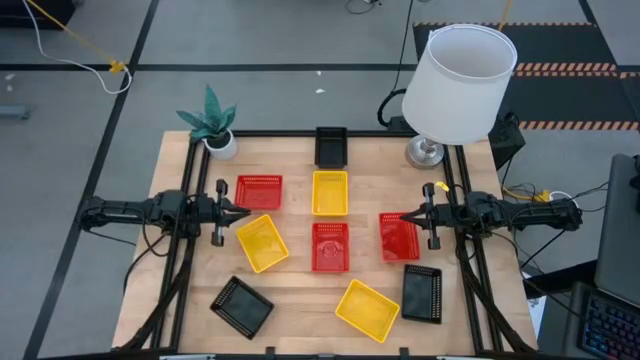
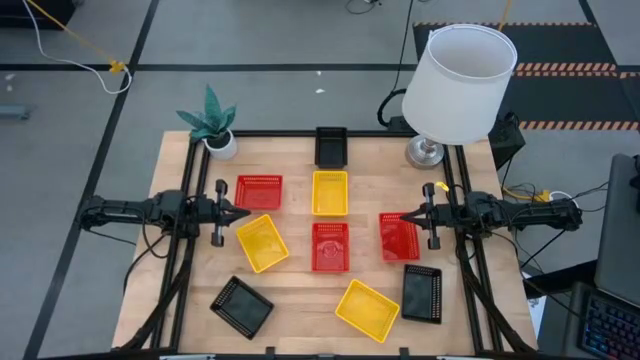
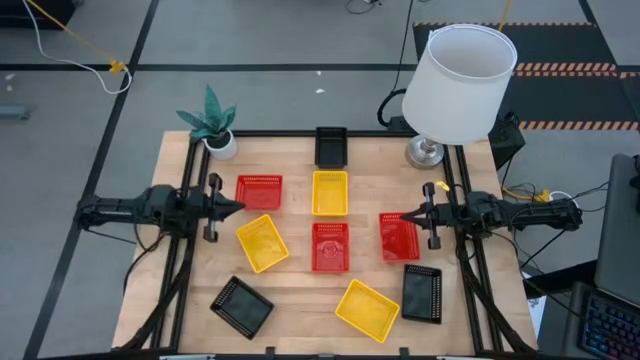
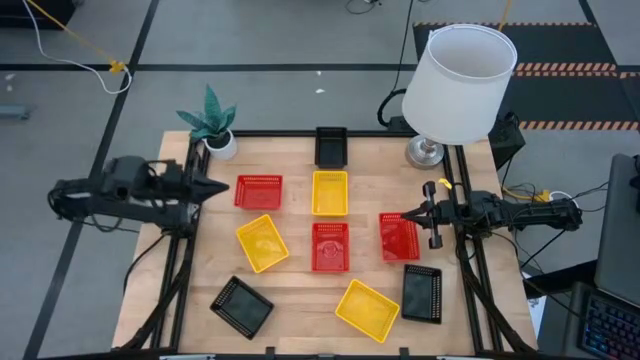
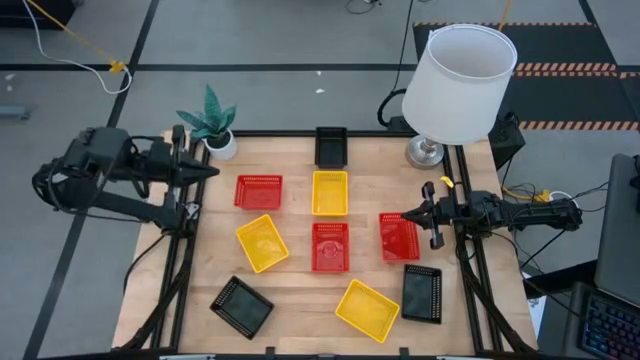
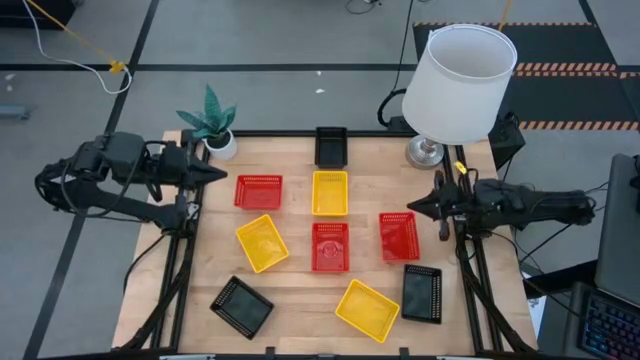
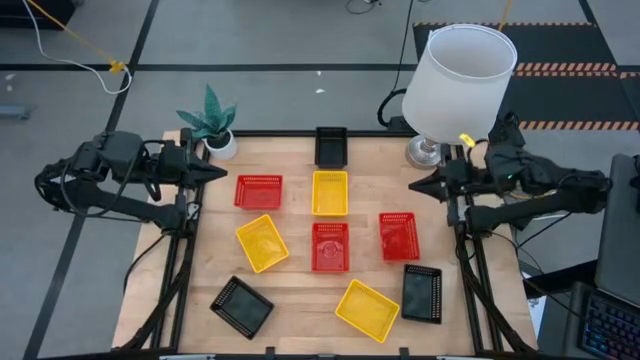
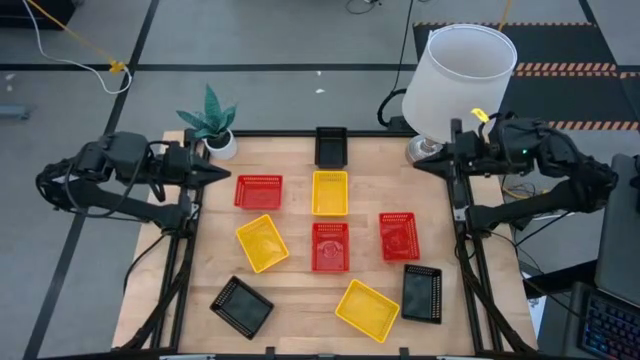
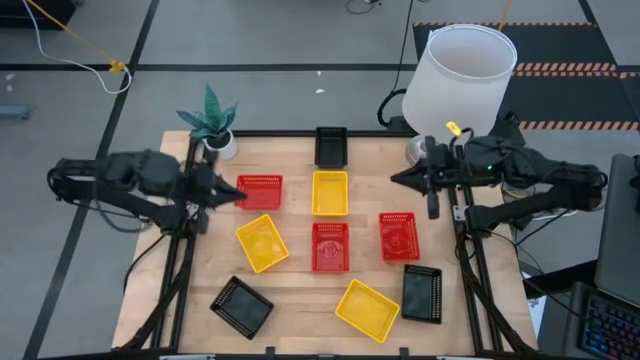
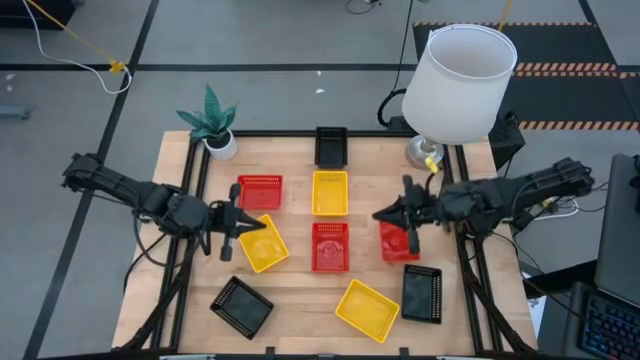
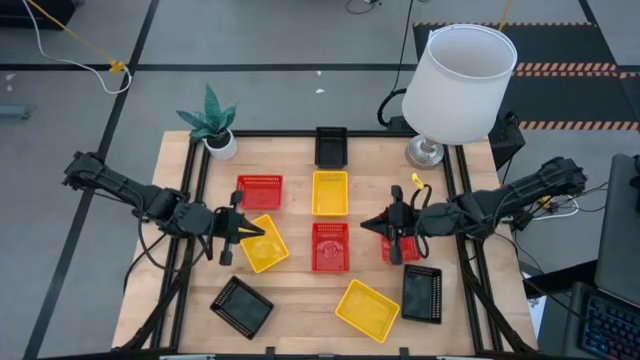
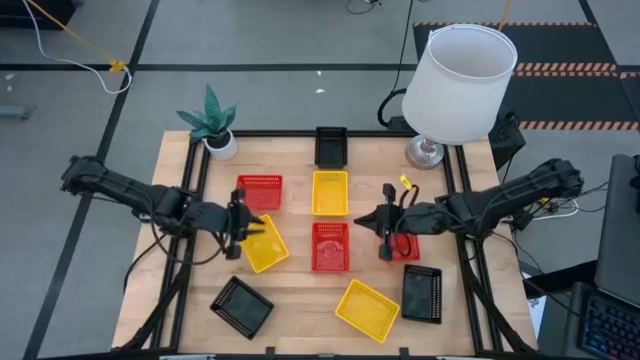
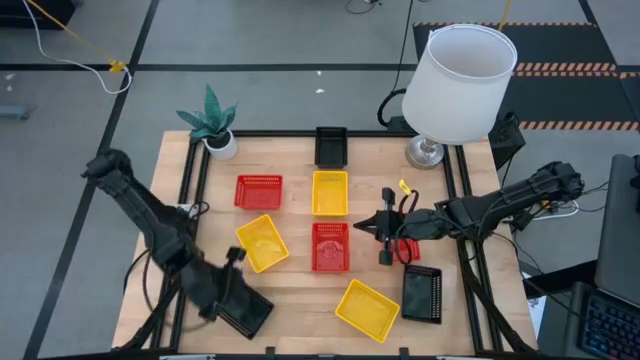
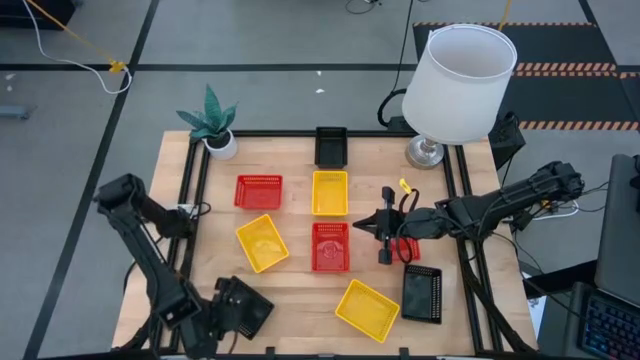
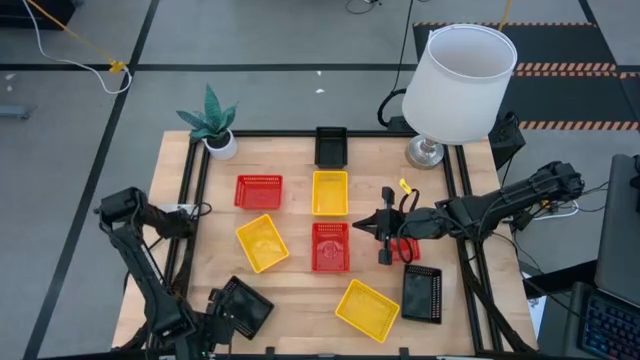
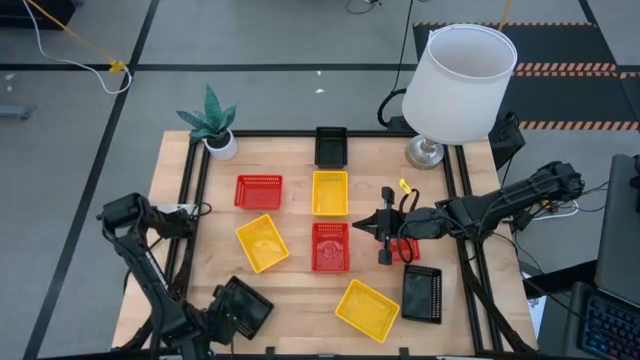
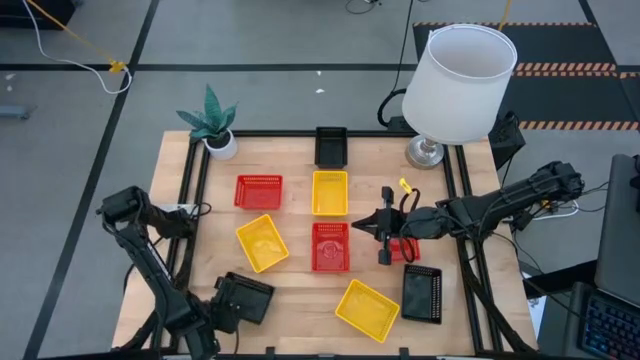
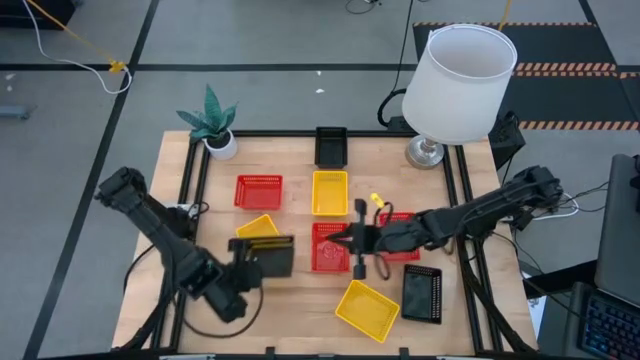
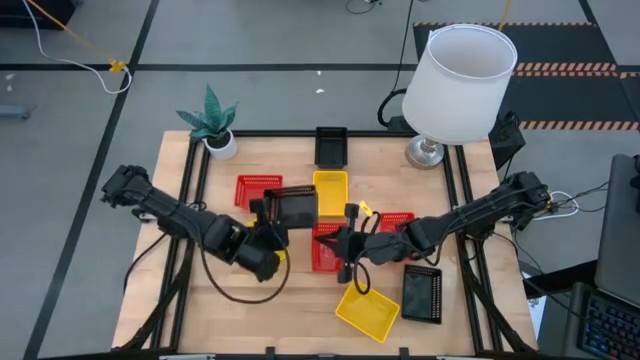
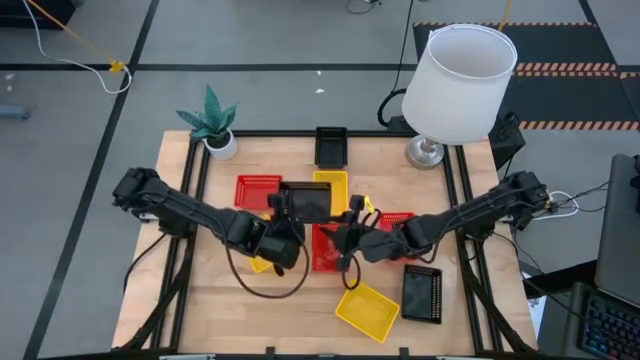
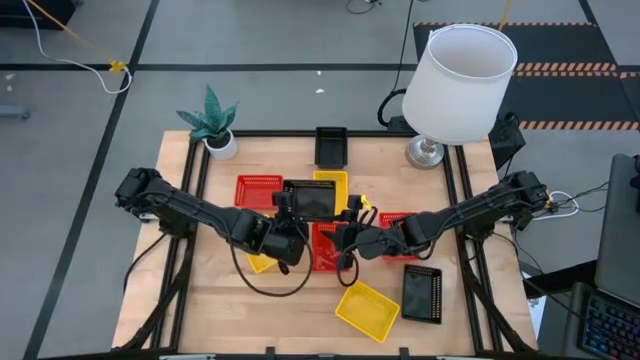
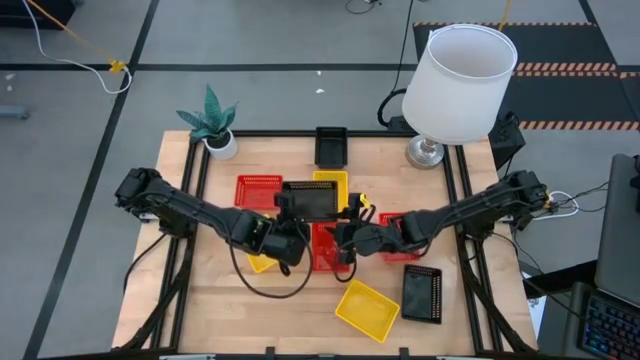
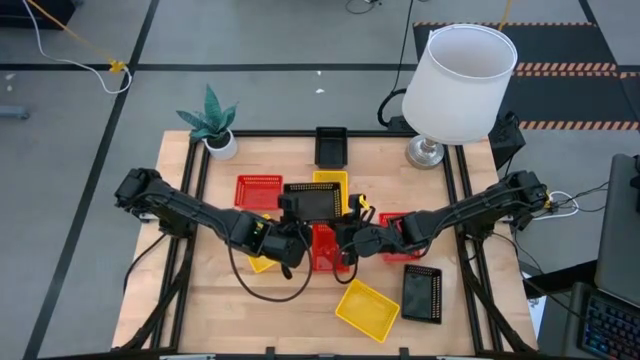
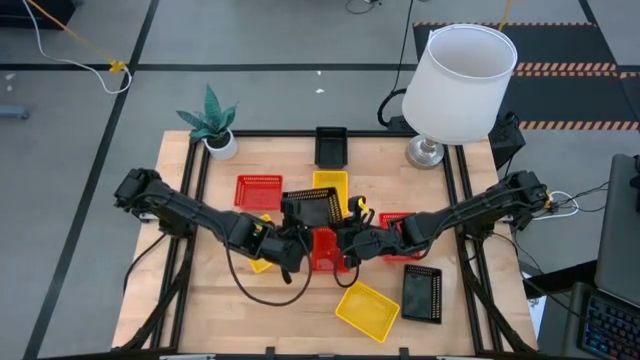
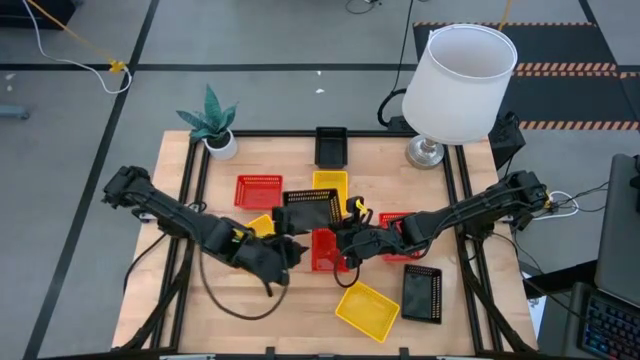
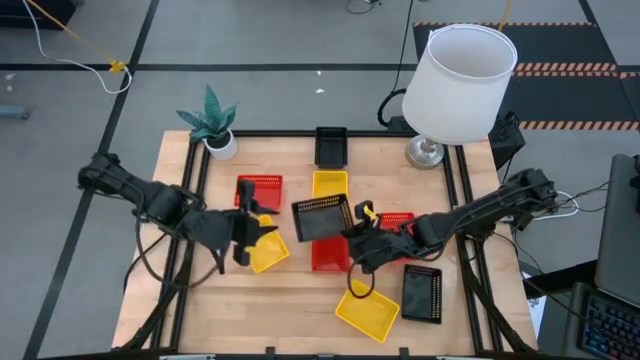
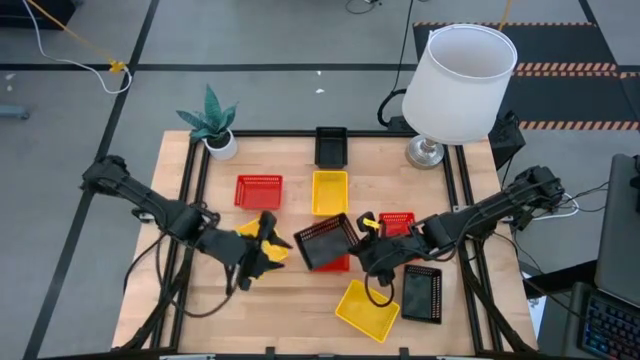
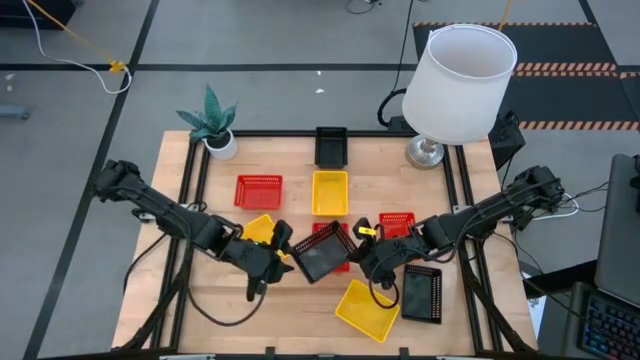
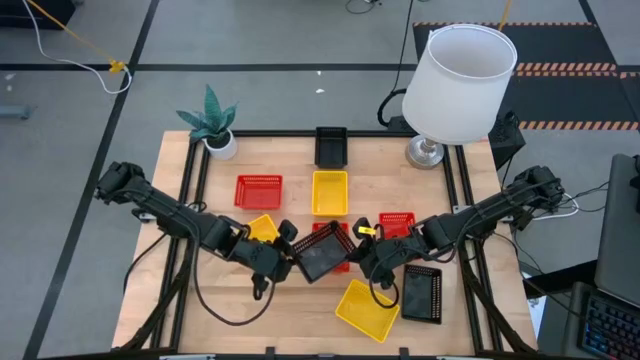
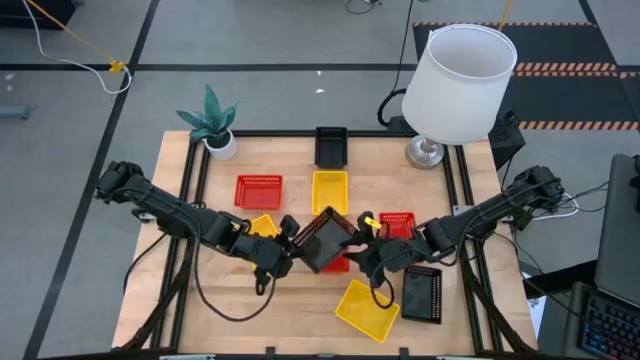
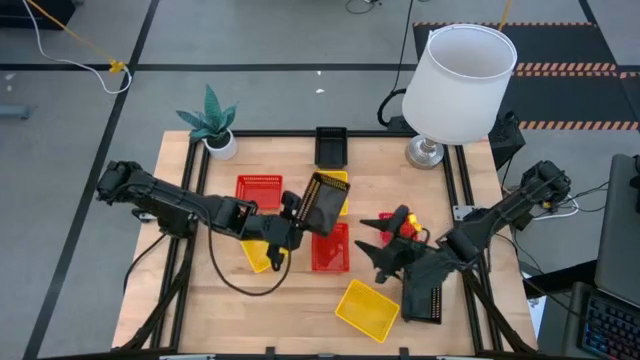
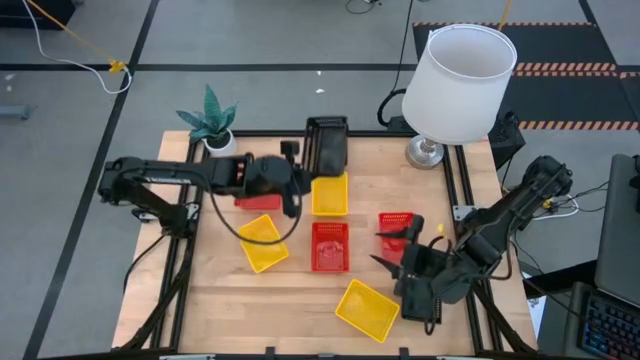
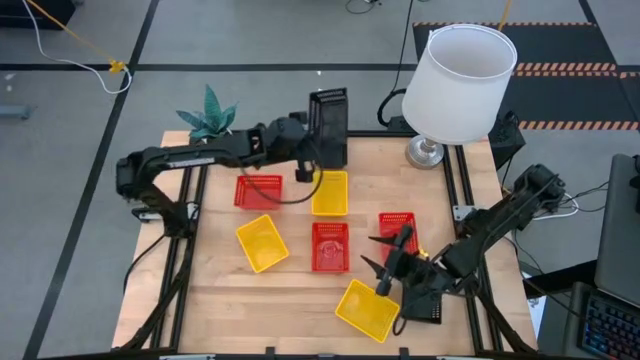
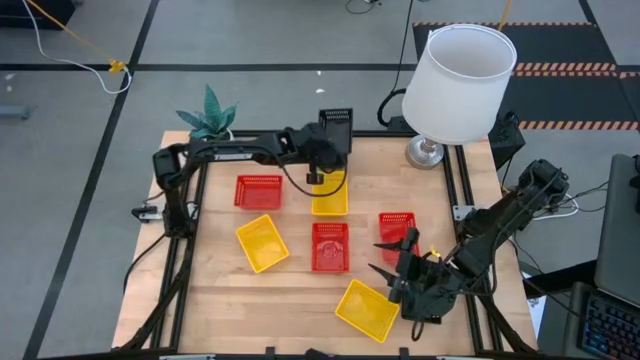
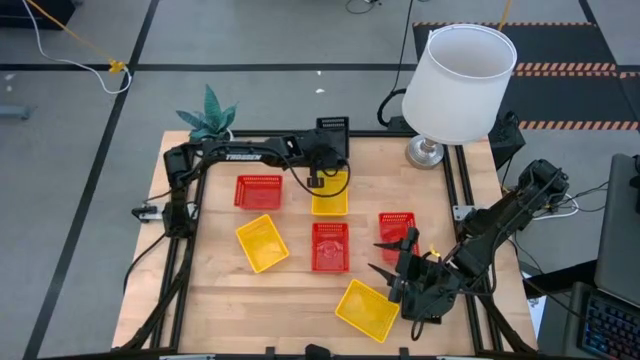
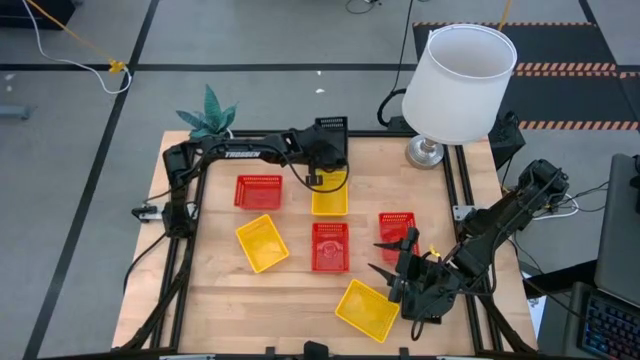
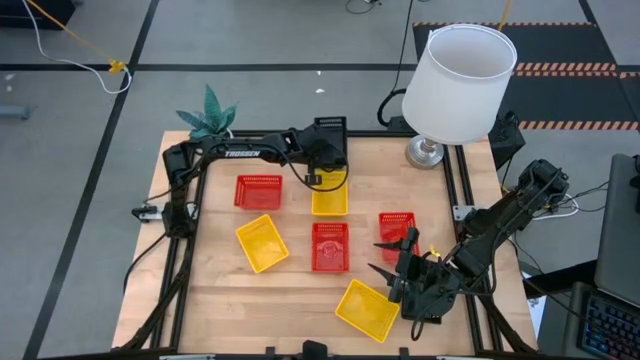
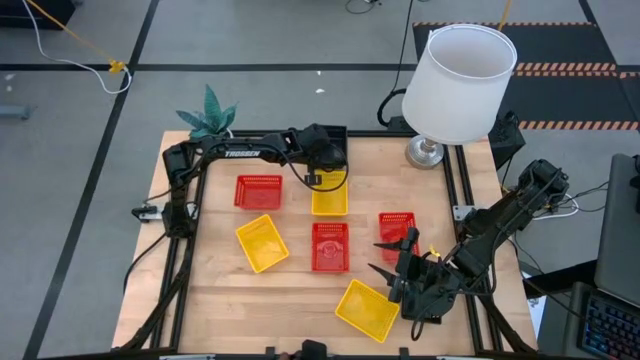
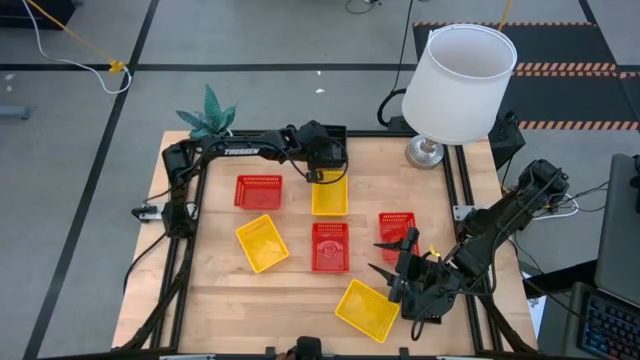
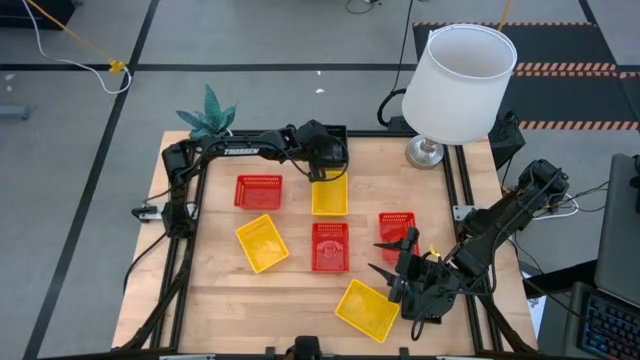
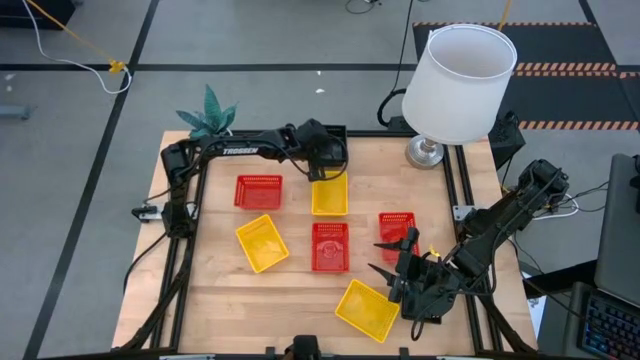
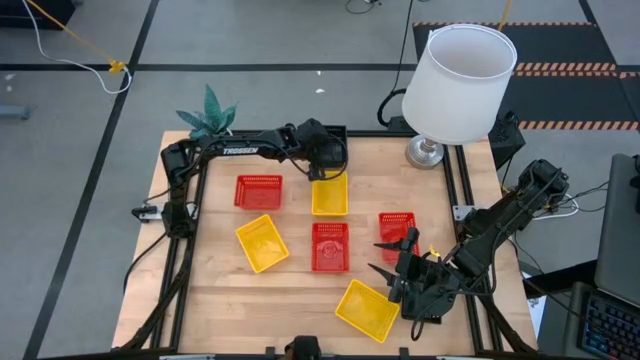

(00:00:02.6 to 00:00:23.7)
Stack the bottom left black bin on top of the top black bin
